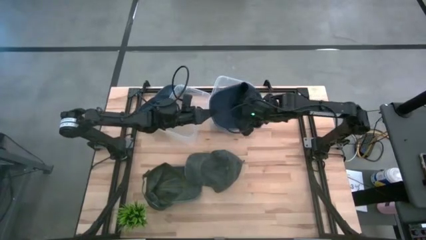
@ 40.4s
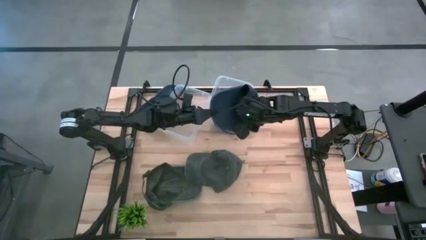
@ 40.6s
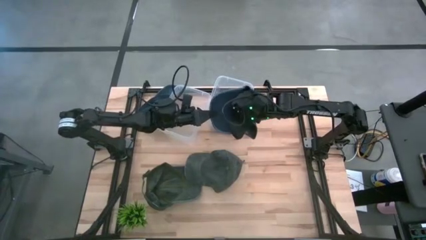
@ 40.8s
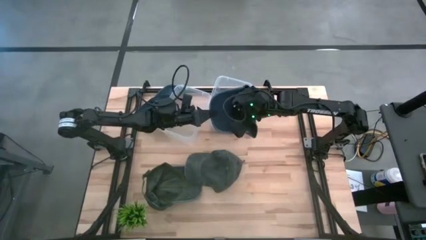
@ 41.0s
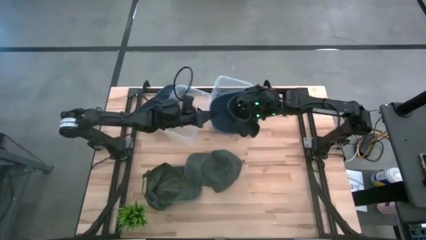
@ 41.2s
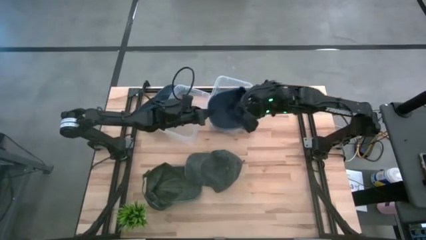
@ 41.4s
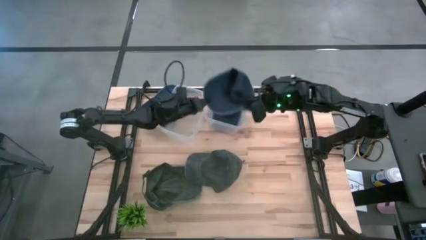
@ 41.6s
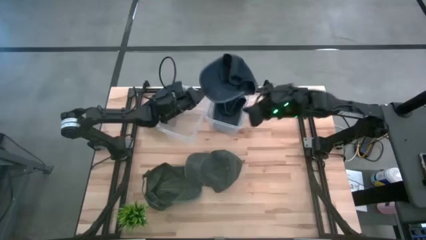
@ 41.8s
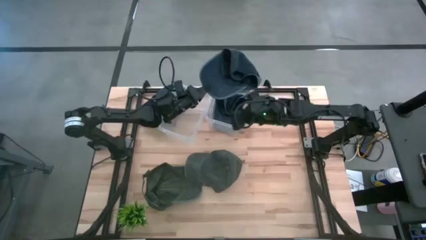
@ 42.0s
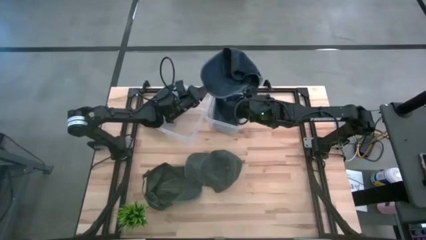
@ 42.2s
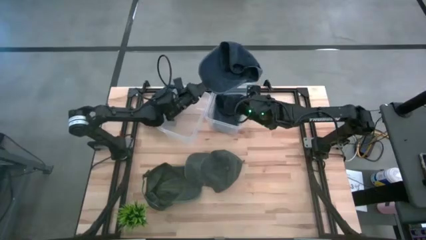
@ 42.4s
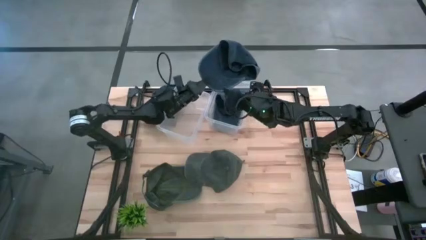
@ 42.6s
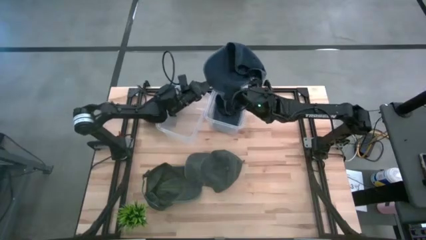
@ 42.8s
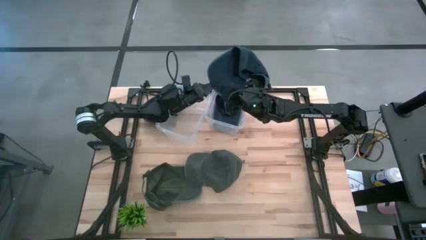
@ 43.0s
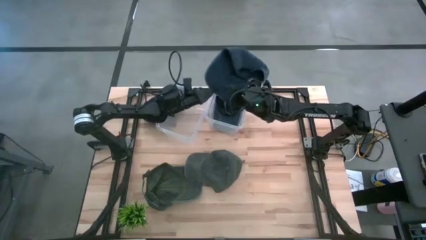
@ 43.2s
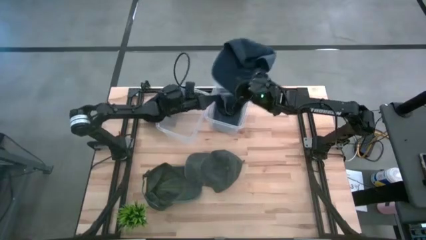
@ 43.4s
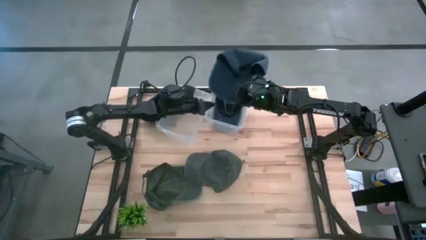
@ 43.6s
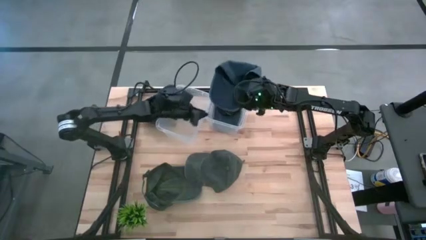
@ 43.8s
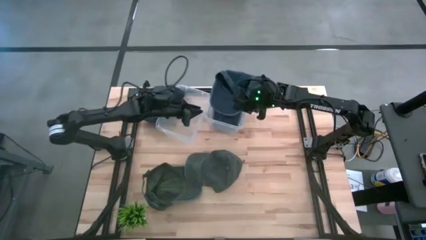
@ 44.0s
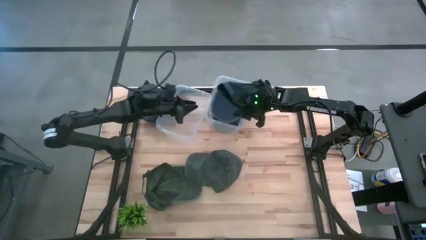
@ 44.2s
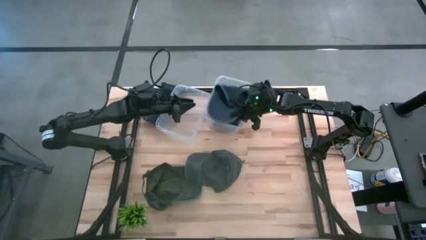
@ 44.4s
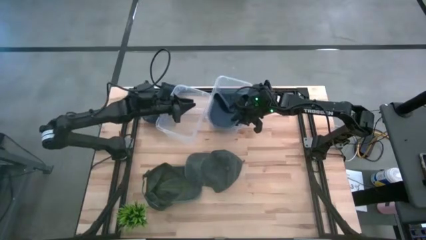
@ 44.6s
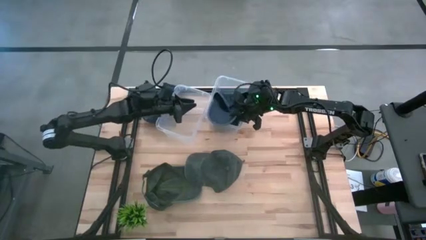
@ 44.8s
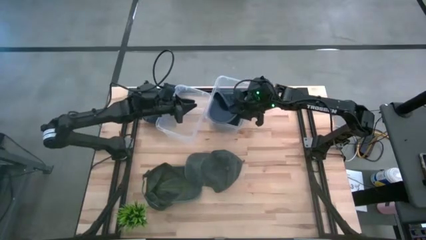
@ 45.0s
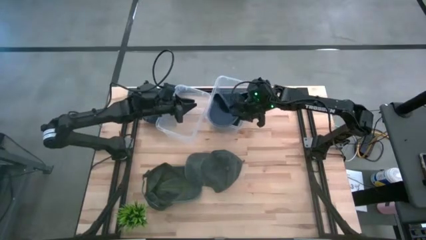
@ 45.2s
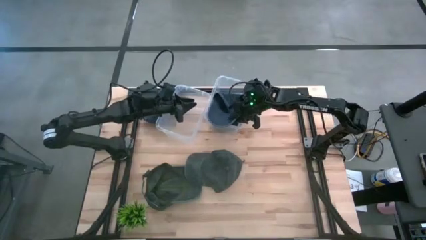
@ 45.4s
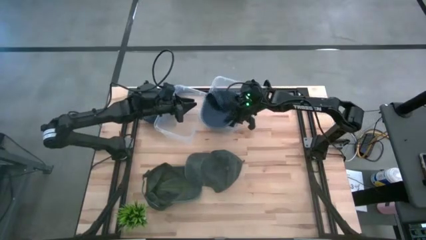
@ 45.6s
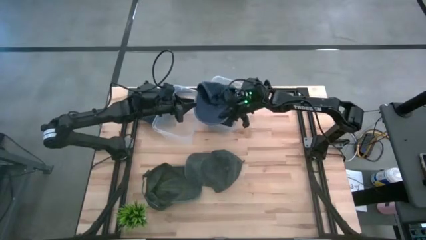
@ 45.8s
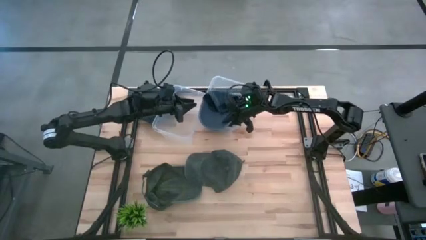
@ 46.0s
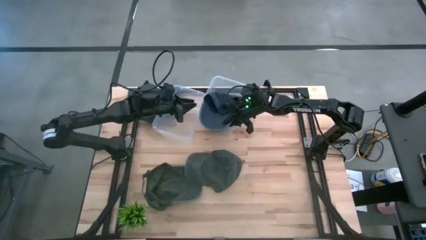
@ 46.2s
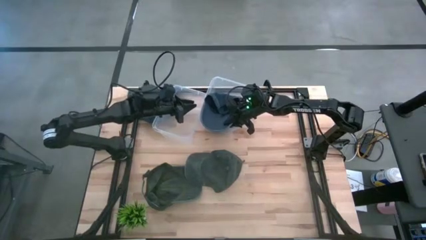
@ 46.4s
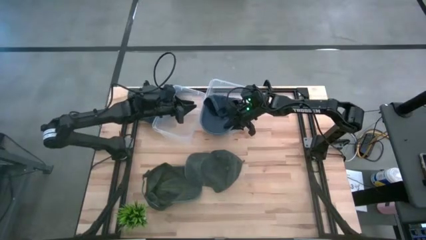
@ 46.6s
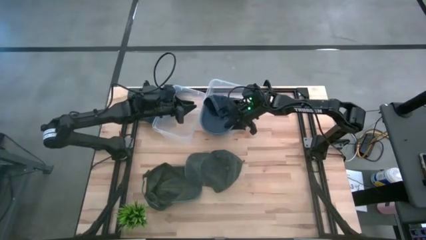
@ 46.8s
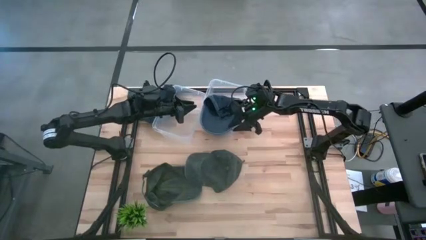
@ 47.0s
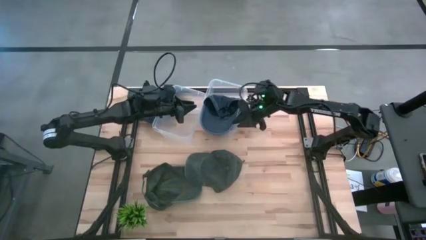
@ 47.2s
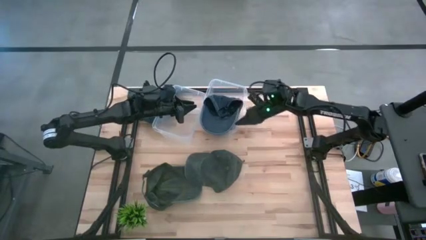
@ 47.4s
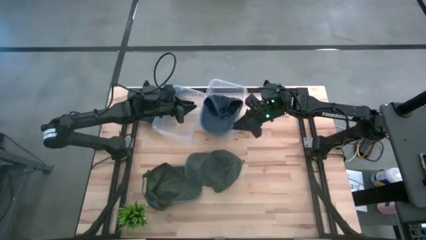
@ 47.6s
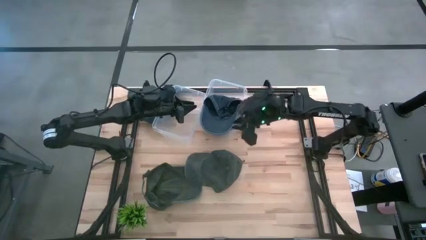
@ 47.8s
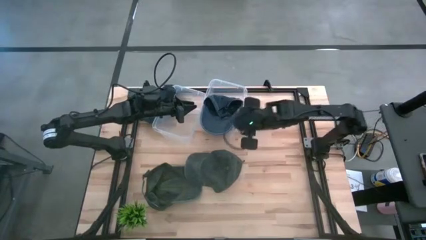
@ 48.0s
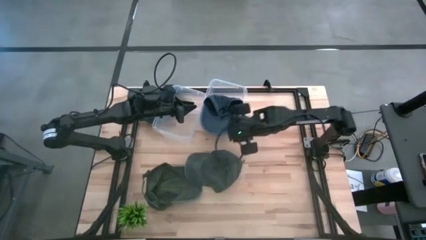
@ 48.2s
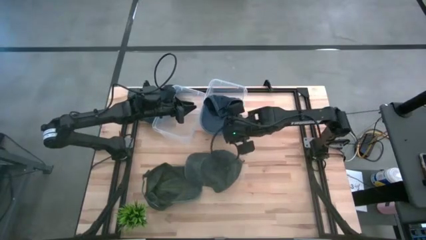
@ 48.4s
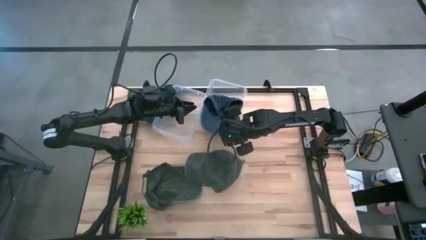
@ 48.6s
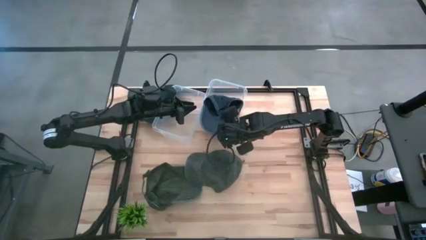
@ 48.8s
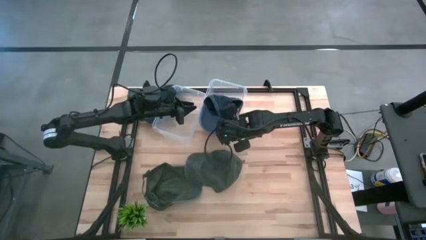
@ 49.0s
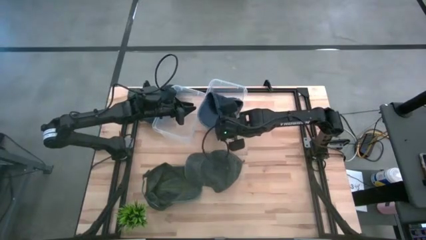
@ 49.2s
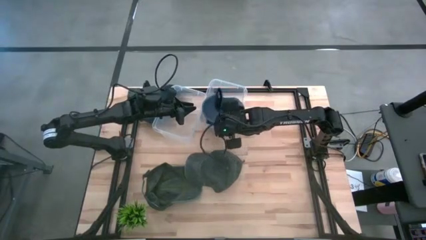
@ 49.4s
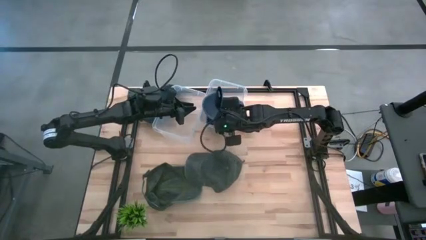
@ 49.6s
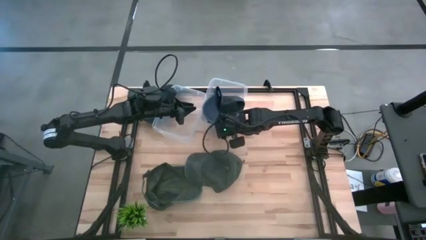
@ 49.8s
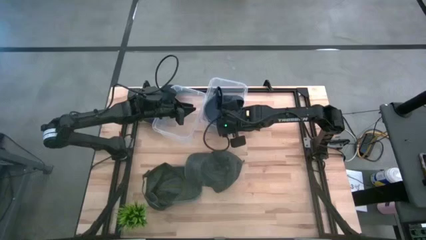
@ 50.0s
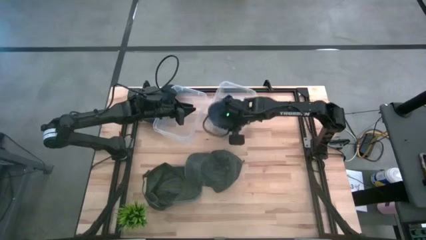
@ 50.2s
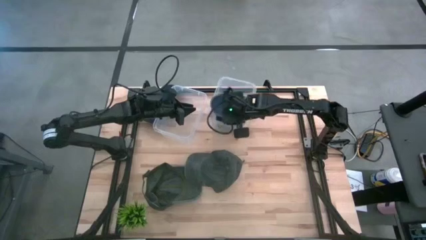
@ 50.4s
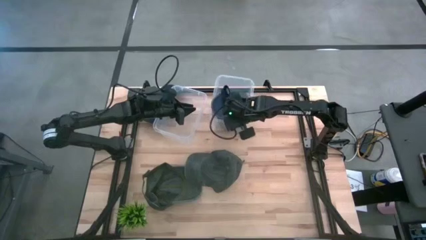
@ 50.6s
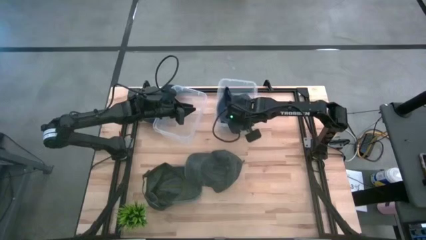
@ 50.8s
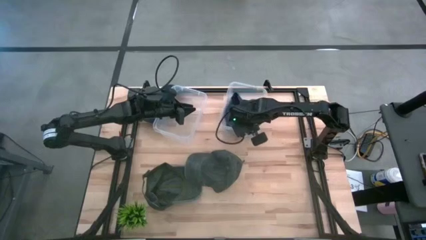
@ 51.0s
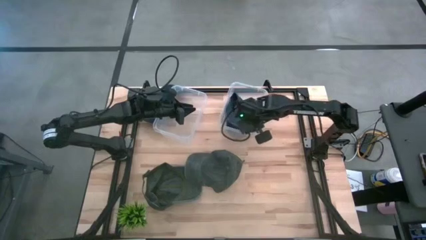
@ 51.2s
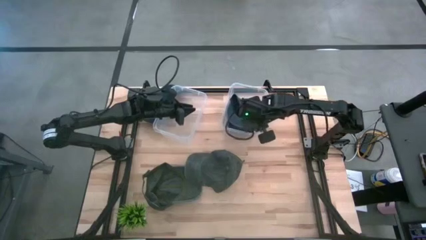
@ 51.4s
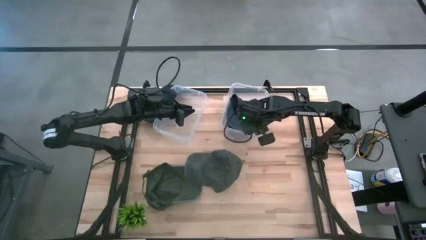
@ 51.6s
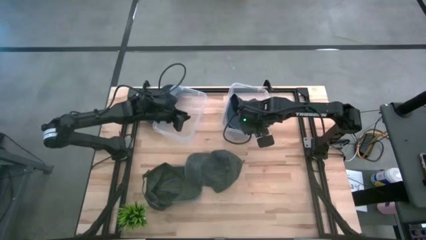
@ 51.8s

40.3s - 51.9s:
Task: Pick & Place hat
Put the bottom blue cap into the right transparent bin

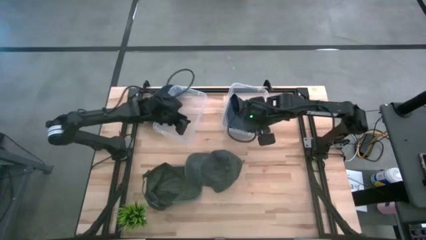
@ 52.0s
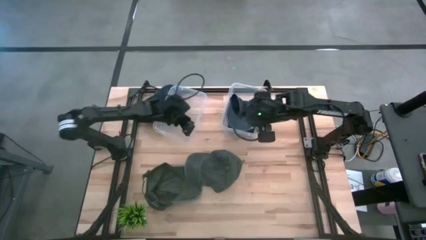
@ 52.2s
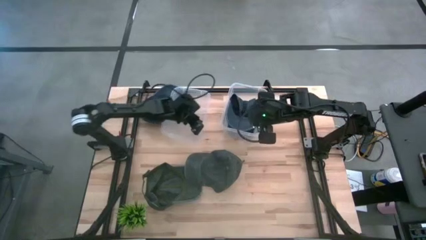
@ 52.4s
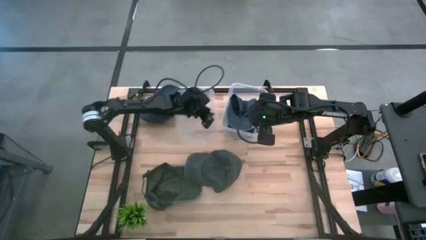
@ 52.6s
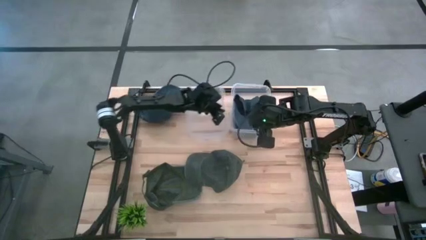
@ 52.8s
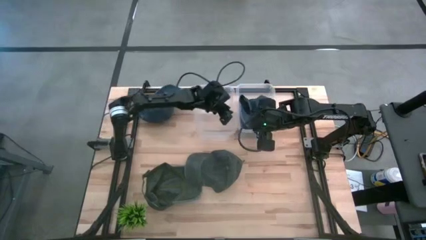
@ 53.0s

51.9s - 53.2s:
Adjust the left transparent bin

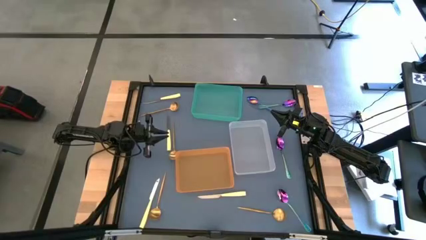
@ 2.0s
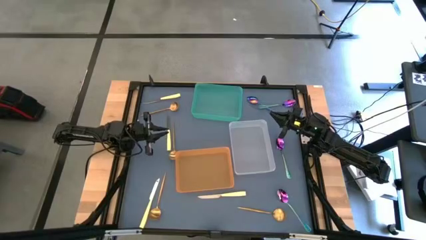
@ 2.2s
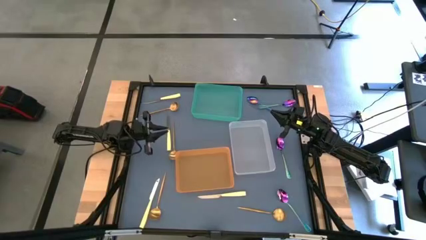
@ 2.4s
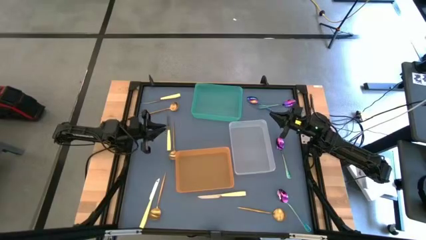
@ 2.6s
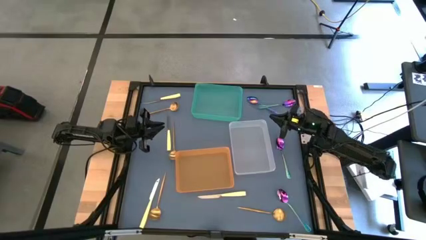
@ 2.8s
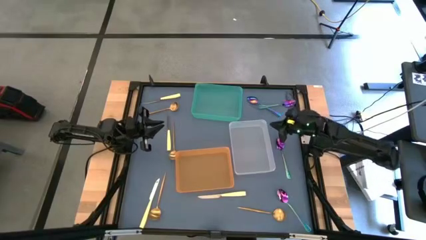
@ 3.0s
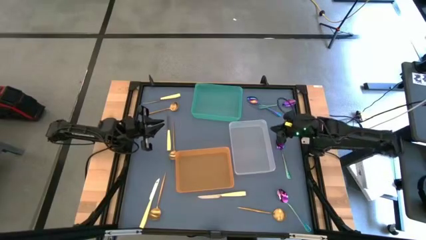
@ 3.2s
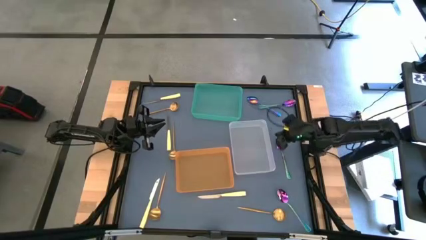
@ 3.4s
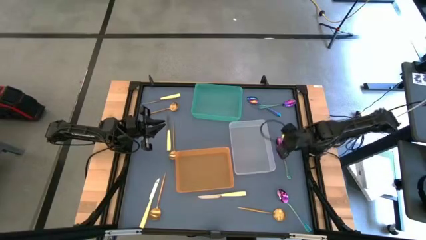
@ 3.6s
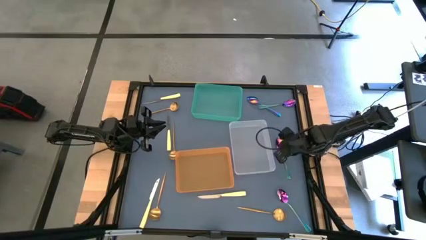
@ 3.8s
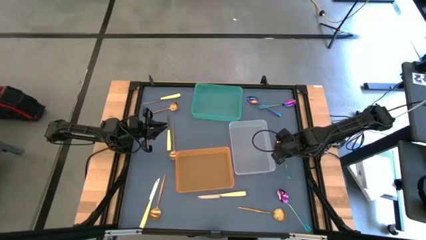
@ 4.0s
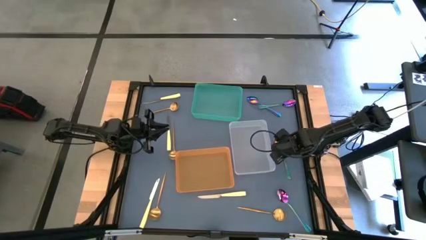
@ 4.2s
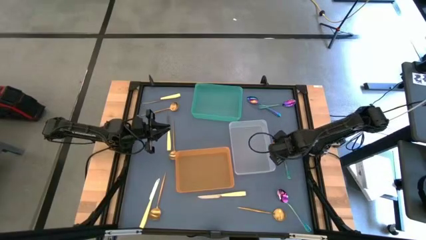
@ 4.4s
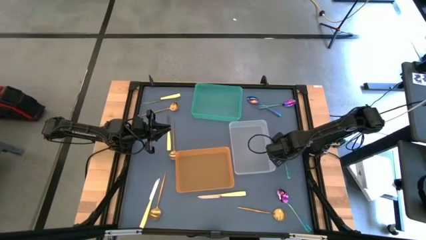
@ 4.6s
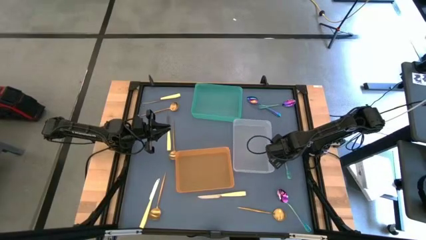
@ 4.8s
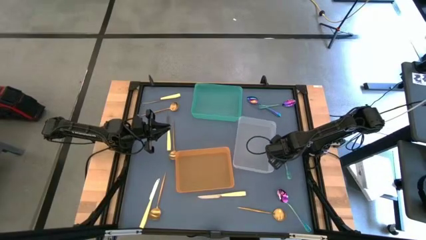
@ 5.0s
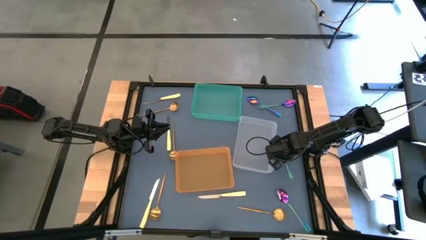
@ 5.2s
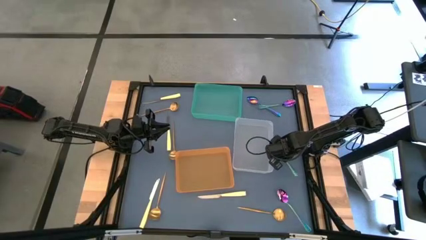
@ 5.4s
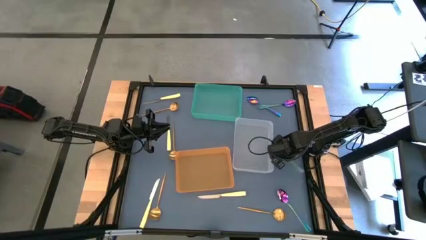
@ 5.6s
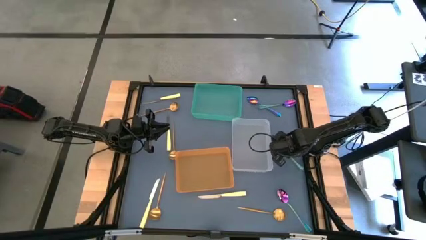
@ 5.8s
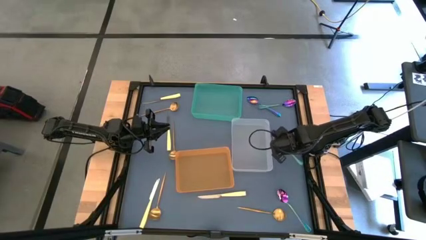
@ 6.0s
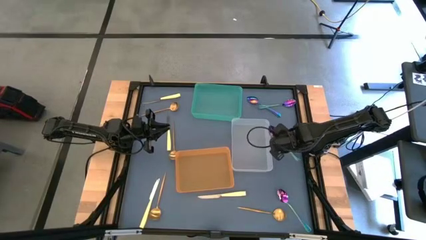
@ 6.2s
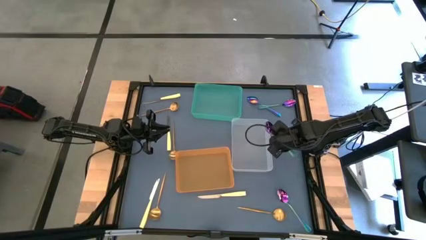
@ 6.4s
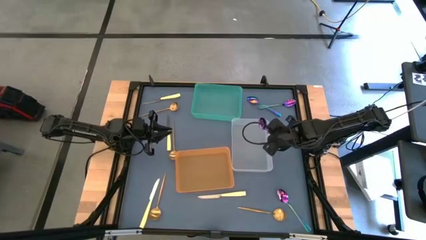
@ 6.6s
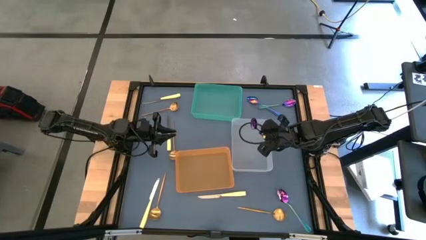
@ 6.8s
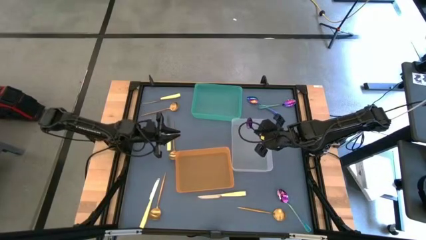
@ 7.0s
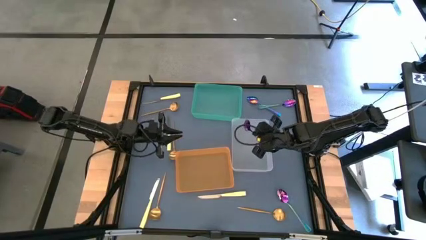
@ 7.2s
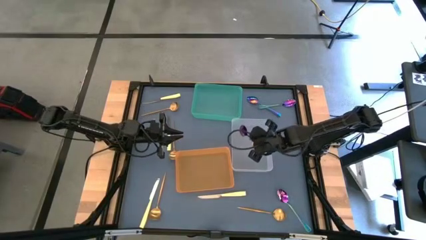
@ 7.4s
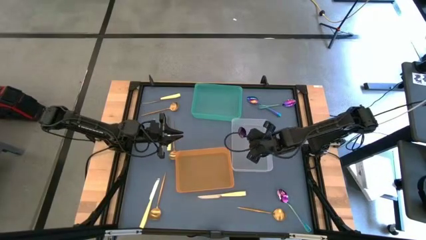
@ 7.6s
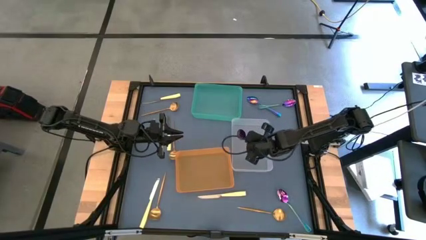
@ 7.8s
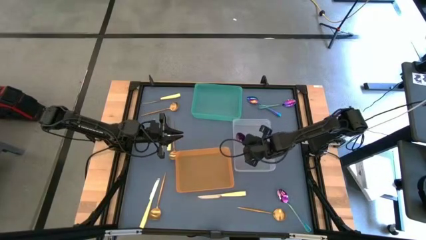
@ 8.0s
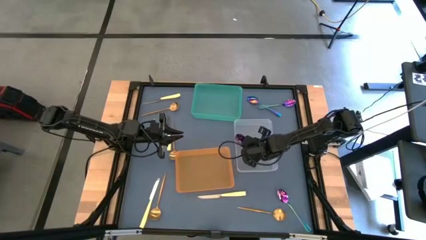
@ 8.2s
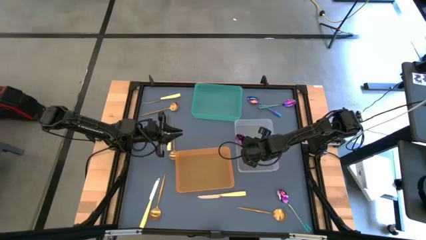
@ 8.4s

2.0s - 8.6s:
Task: Sort silverware by color (type)
Put the blue spoon into the transparent bin
